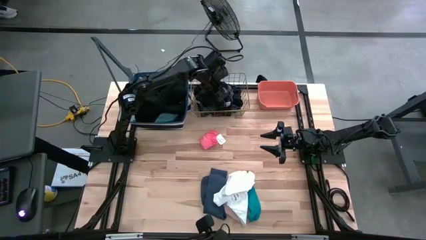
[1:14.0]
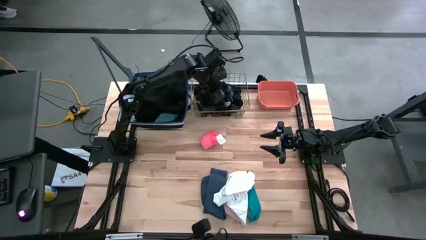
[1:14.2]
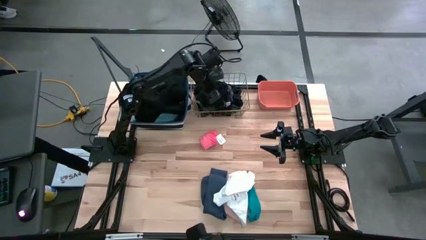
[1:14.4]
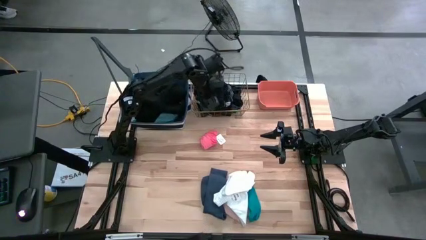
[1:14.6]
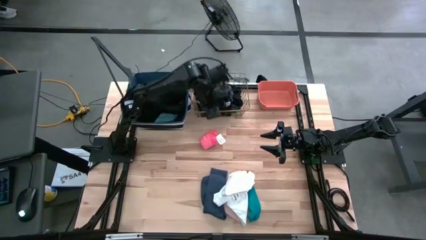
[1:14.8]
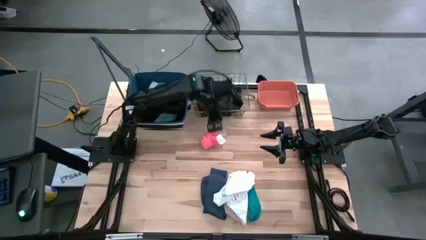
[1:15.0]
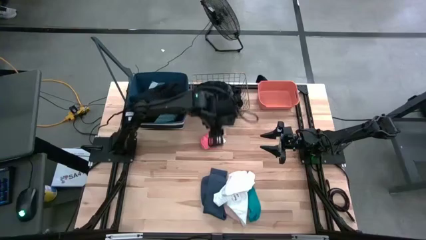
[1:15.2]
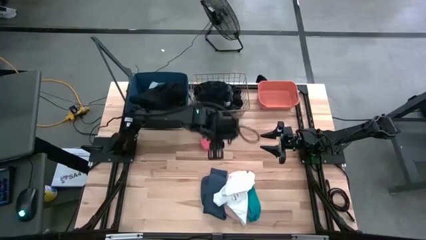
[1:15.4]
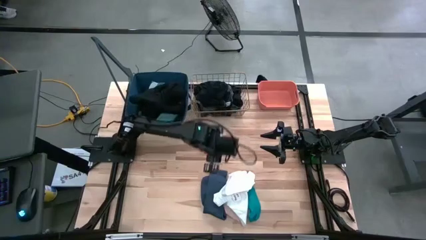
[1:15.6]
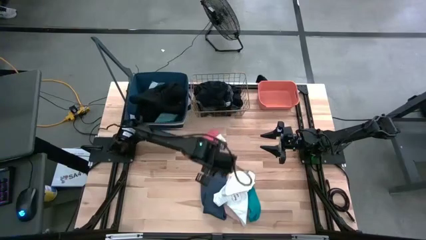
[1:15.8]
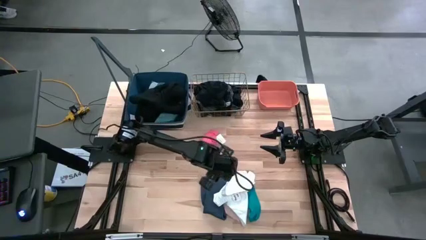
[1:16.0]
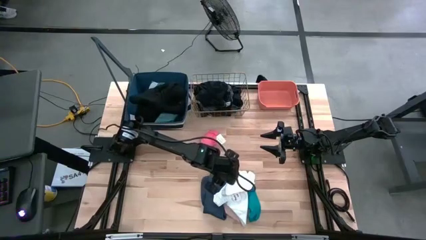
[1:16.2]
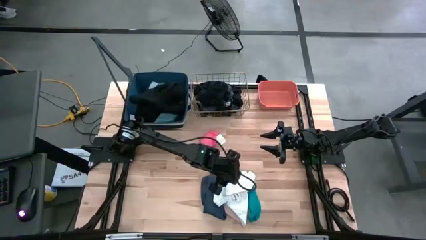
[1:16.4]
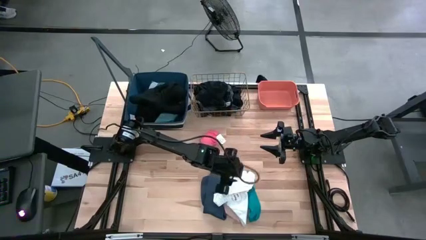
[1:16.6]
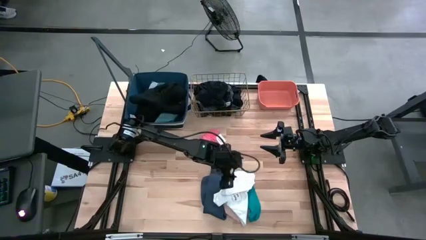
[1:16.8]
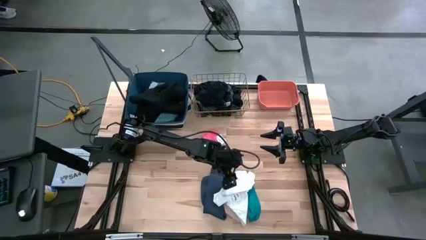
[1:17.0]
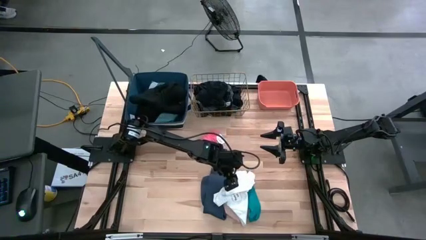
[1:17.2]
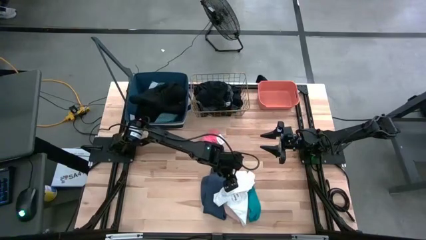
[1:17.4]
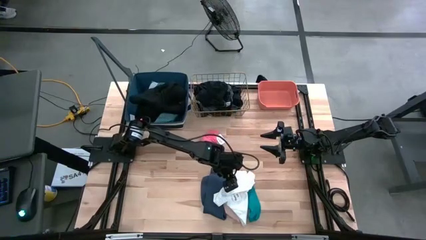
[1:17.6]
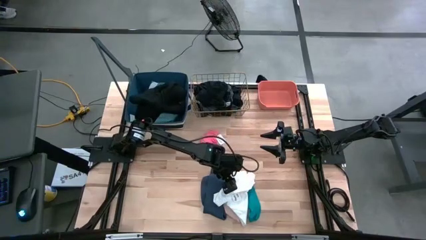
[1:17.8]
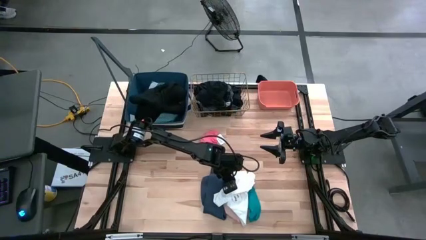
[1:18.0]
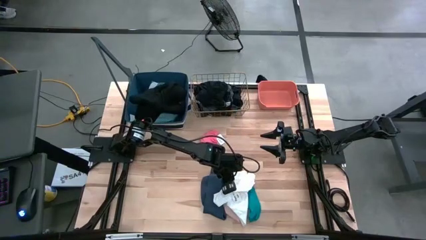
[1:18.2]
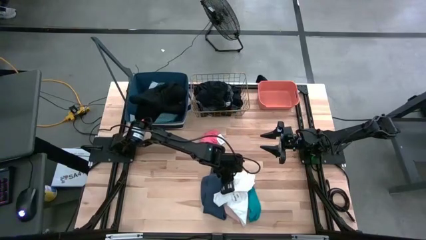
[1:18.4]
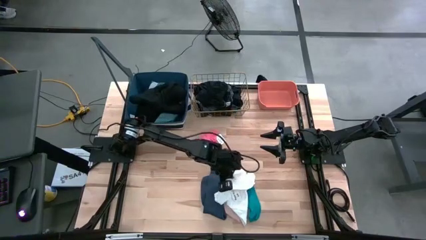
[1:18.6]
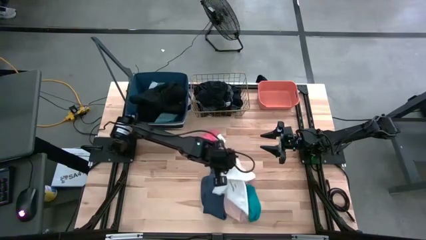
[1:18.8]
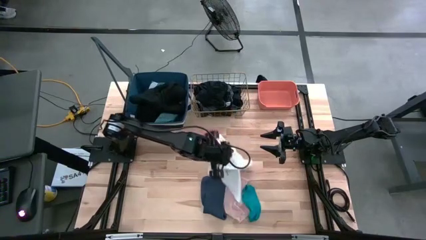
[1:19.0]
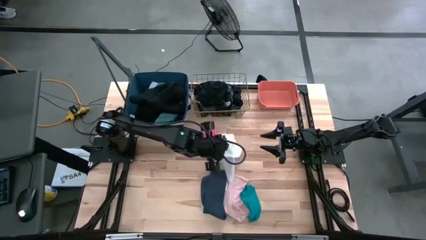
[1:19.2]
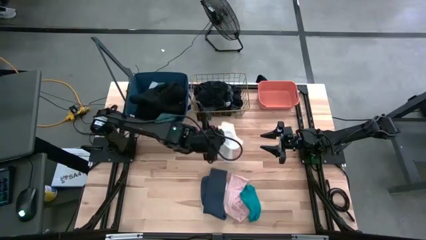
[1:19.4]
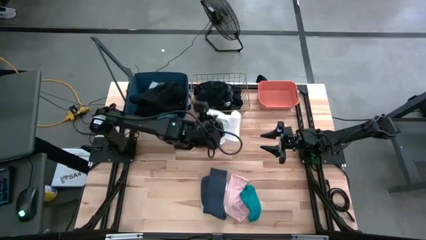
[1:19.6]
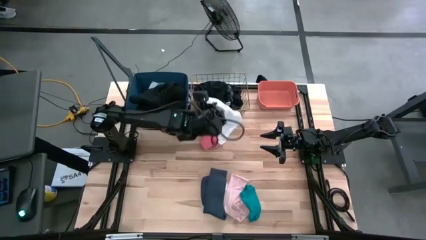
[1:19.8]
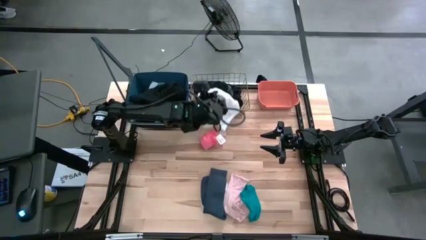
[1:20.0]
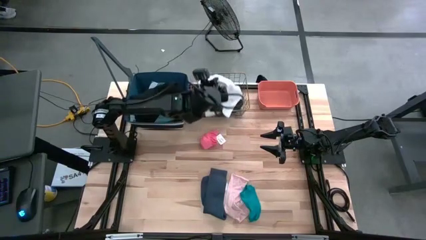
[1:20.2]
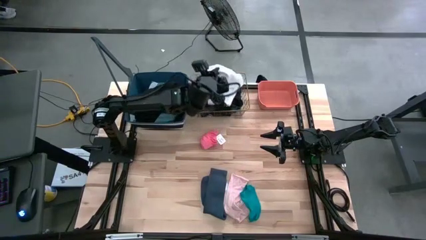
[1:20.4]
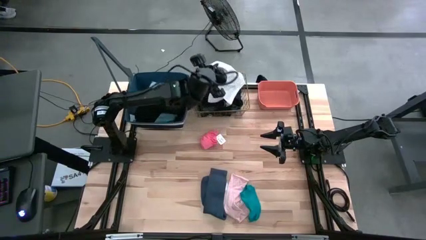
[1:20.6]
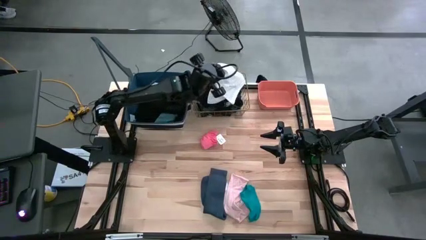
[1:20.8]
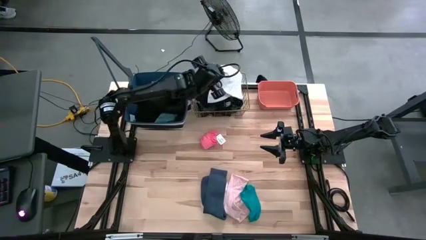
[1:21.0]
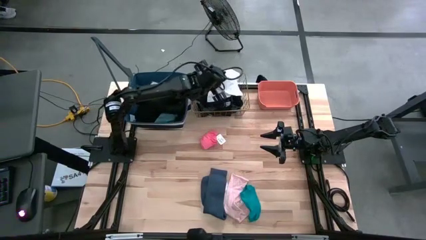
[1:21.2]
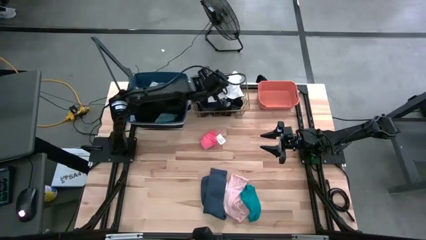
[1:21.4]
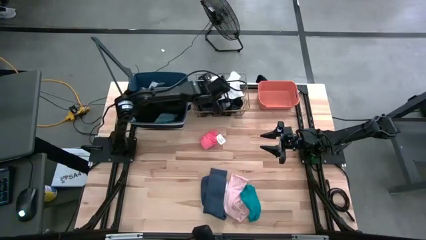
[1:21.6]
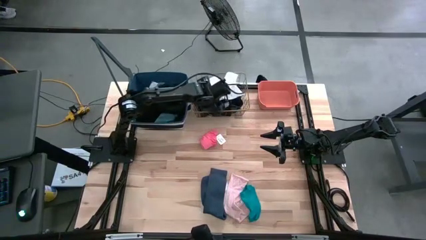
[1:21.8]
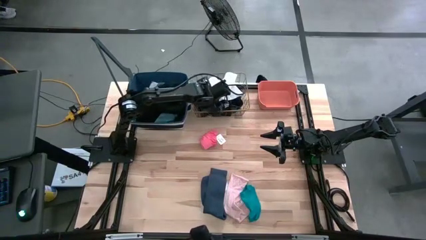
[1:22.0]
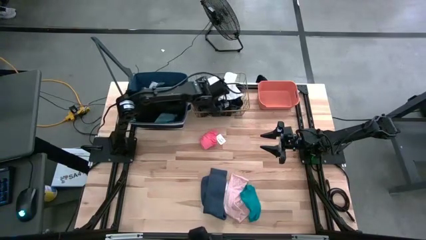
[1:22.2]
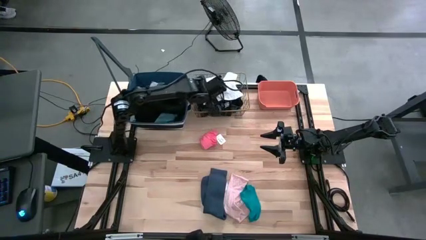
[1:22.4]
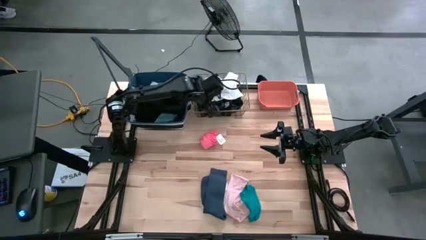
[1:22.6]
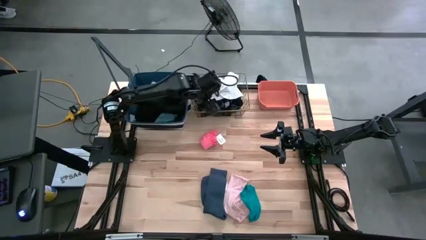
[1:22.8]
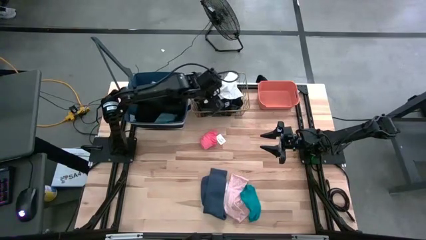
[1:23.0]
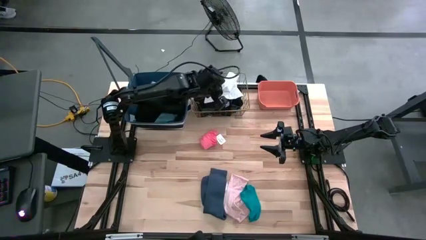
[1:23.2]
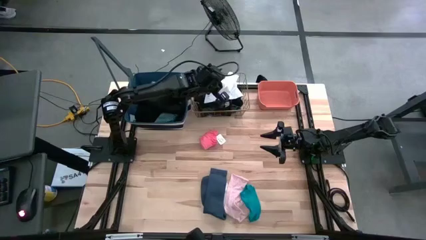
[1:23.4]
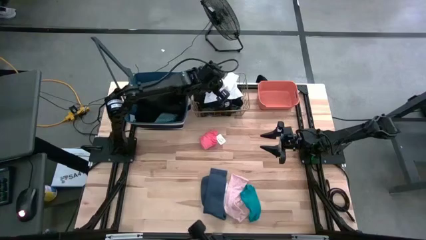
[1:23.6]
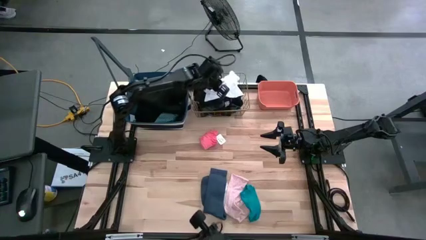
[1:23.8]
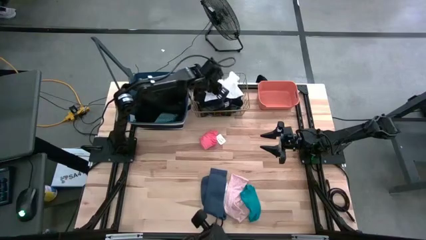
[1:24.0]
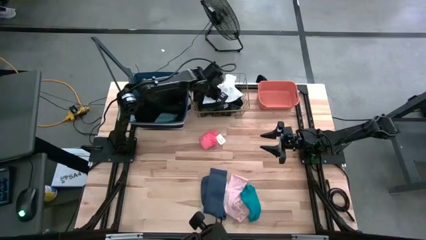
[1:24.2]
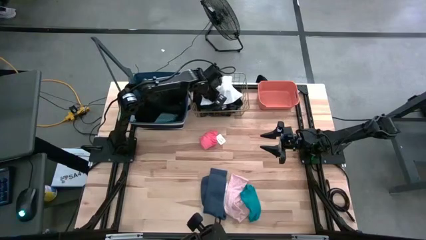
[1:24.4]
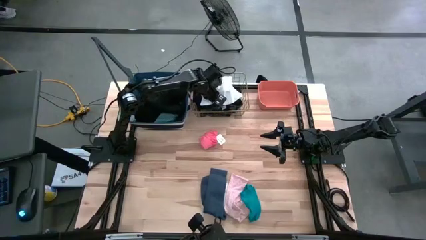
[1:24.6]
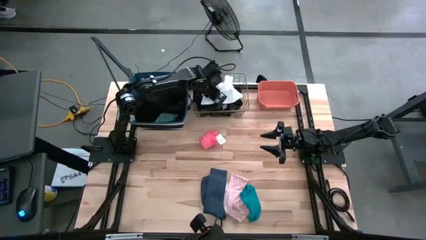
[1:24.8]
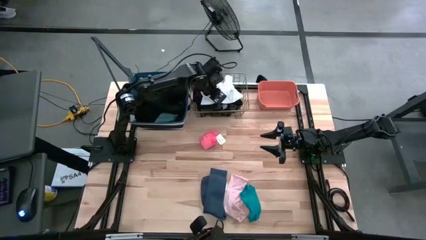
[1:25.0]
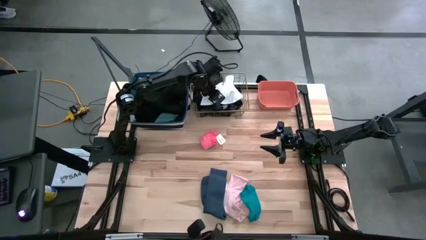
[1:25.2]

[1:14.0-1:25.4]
Task: Pick & Place Cloths
Put the white underwear into the wire basket

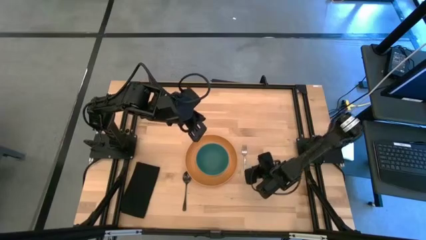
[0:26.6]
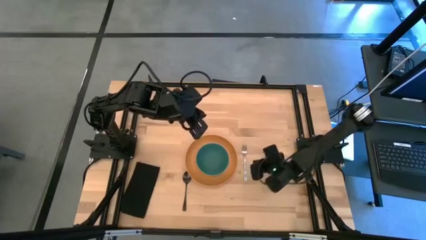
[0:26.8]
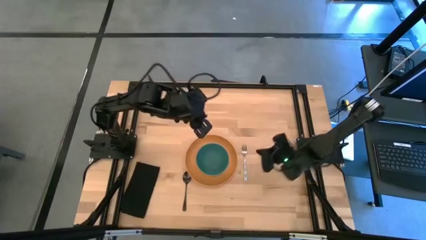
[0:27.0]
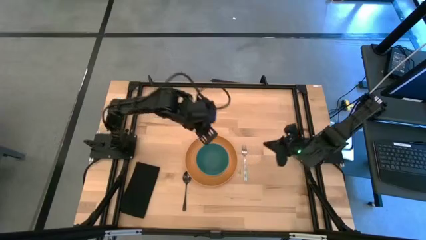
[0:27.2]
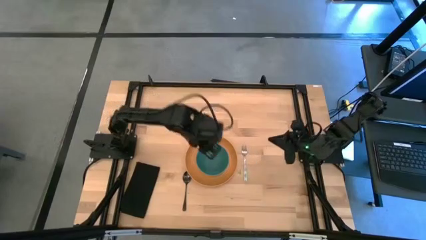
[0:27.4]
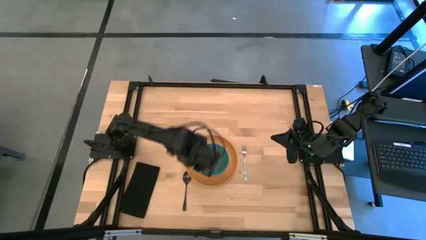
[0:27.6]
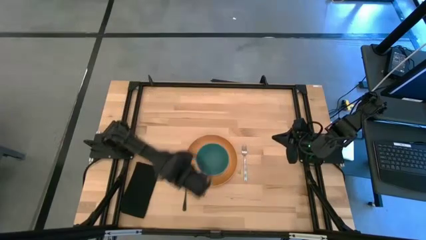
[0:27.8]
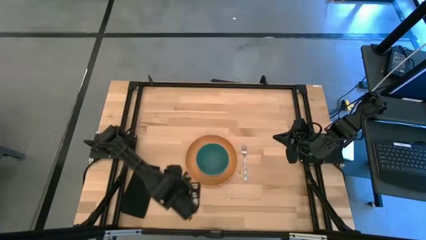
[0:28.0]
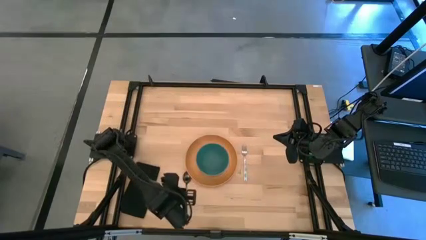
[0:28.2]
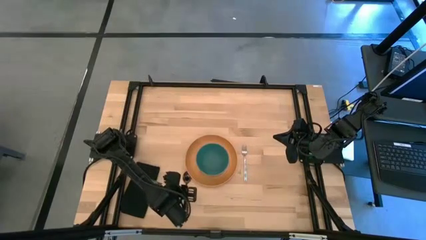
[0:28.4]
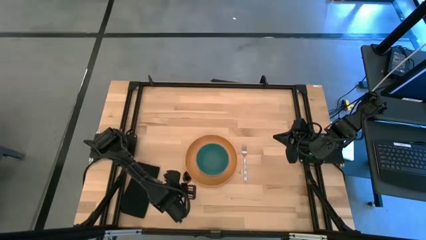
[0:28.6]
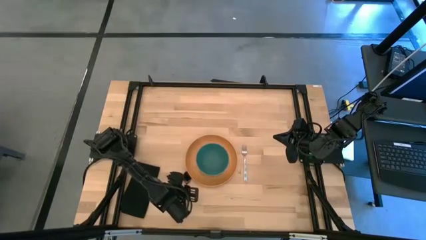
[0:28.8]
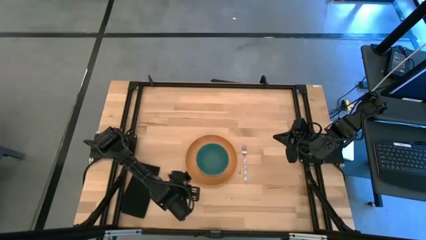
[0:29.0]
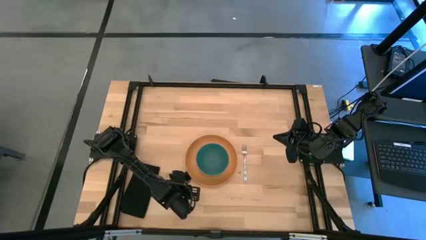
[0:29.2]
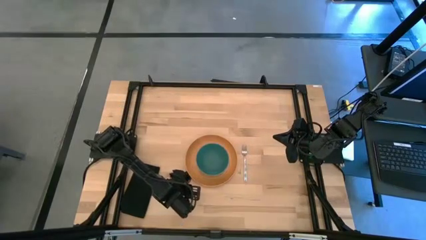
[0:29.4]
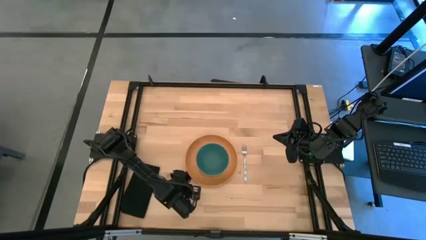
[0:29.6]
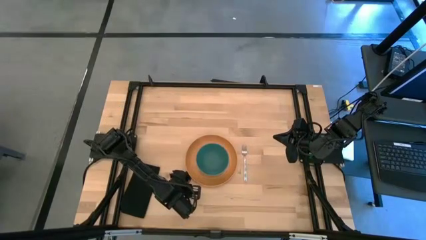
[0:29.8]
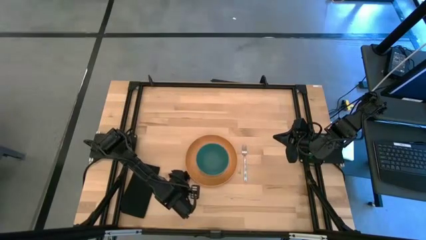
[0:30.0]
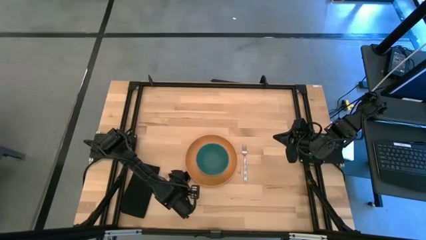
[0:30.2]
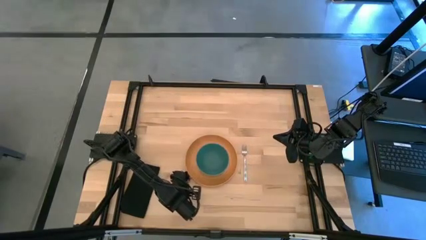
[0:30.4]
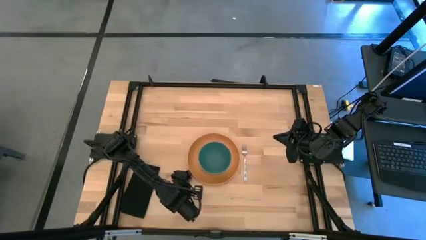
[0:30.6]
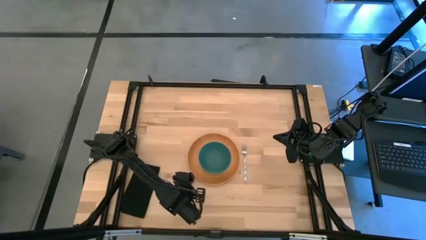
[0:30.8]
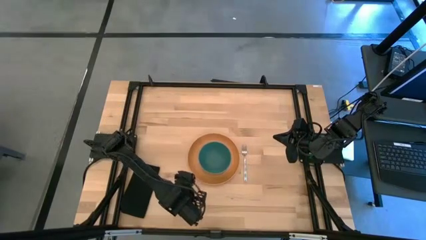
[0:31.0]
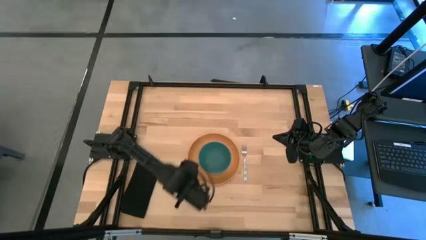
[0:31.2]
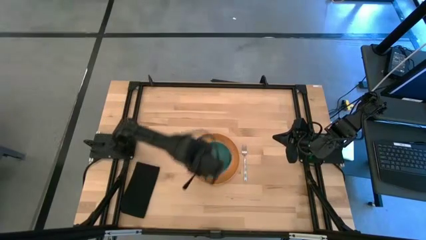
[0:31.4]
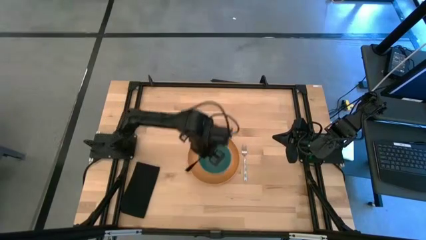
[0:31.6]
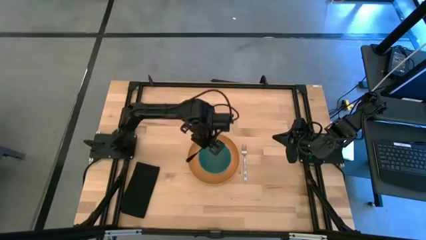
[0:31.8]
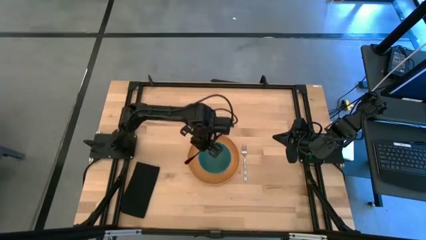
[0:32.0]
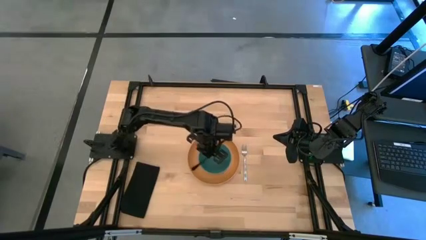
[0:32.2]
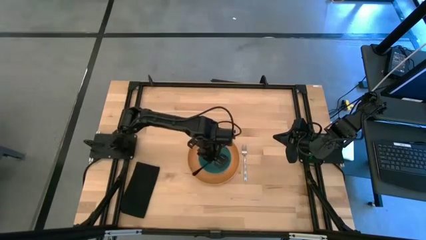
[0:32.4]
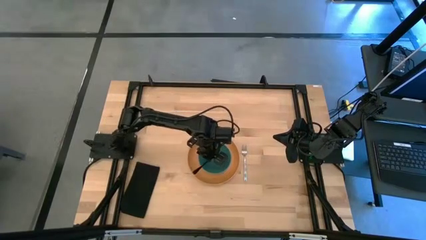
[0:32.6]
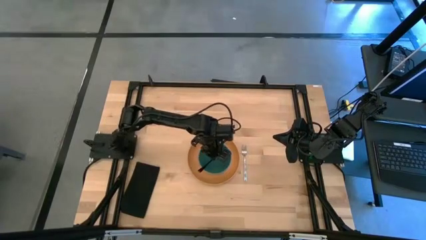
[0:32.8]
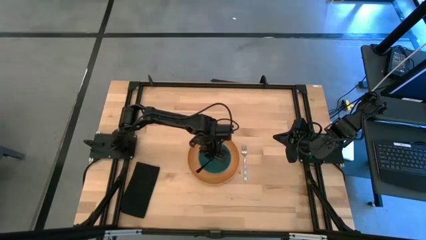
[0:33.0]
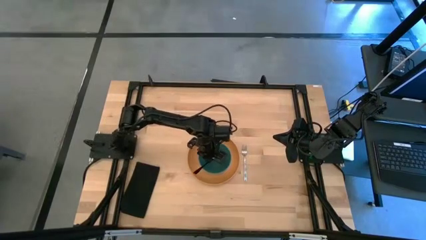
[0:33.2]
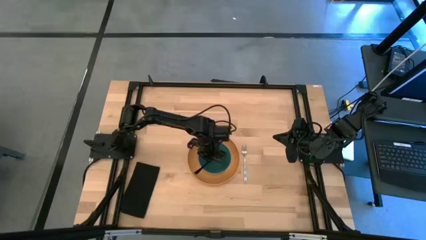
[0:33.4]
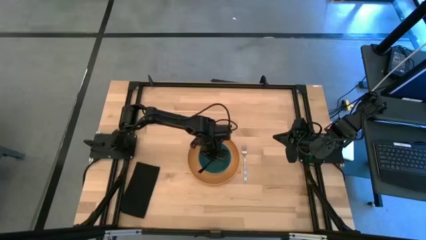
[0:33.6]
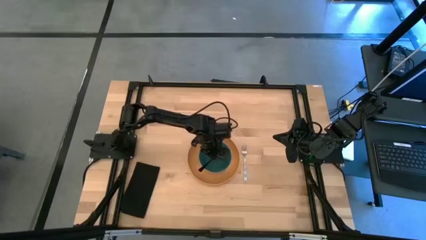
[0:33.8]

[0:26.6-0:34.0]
Task: Set table place
Put the black spoon into the blue bowl
